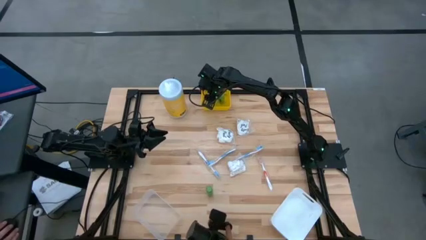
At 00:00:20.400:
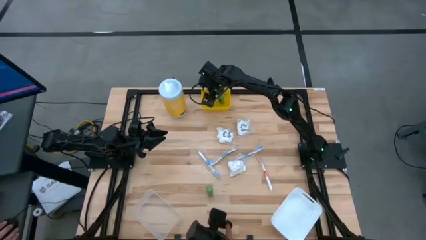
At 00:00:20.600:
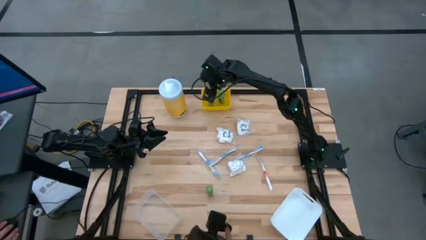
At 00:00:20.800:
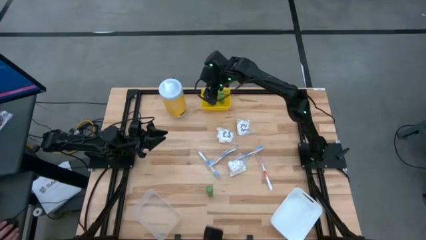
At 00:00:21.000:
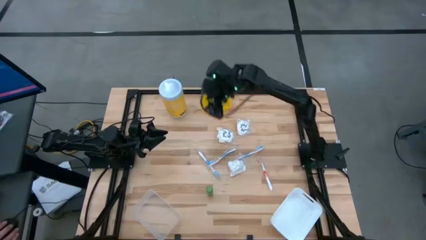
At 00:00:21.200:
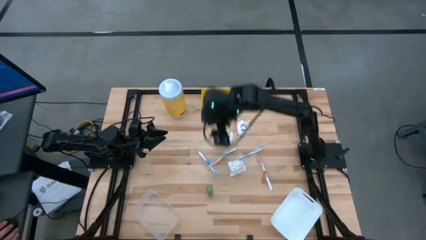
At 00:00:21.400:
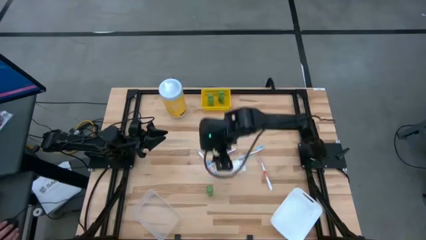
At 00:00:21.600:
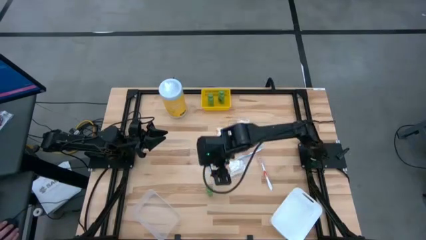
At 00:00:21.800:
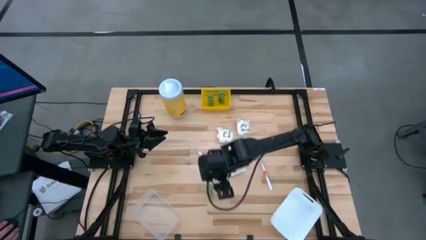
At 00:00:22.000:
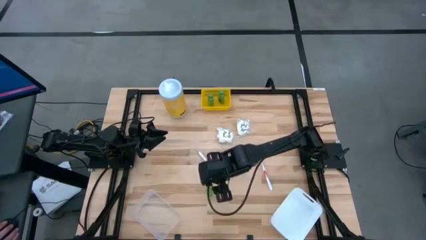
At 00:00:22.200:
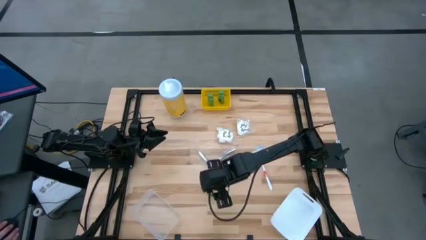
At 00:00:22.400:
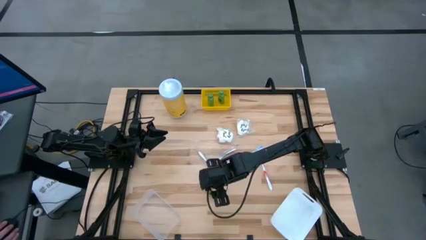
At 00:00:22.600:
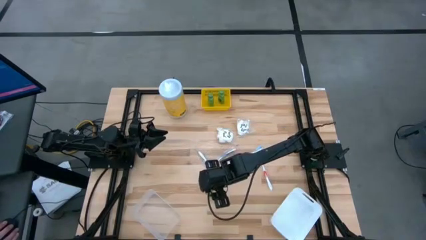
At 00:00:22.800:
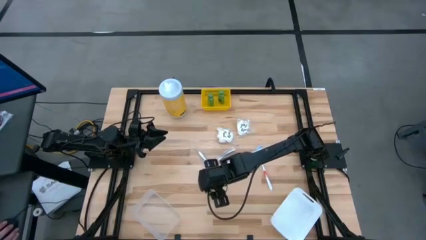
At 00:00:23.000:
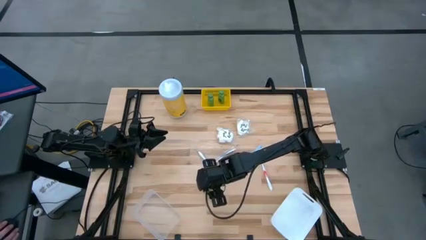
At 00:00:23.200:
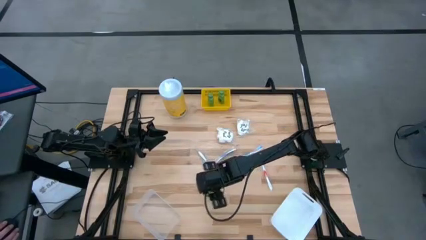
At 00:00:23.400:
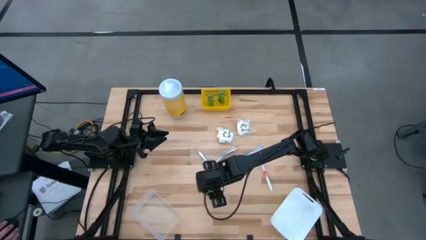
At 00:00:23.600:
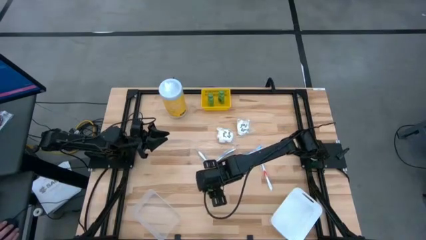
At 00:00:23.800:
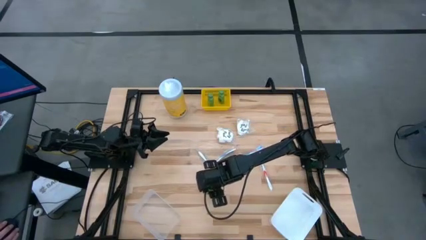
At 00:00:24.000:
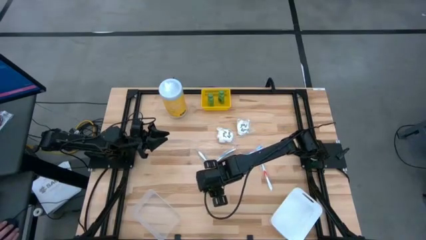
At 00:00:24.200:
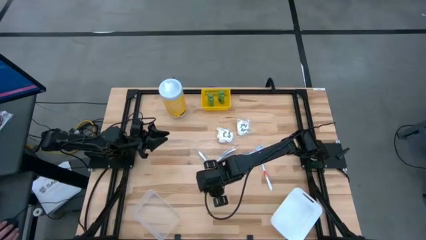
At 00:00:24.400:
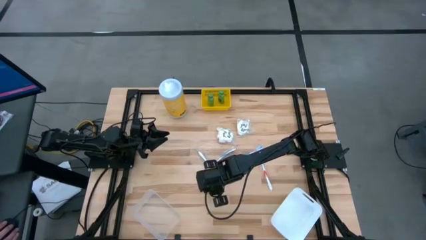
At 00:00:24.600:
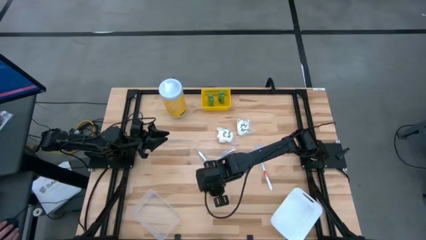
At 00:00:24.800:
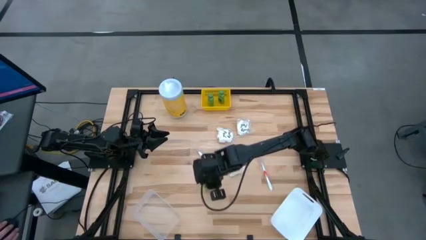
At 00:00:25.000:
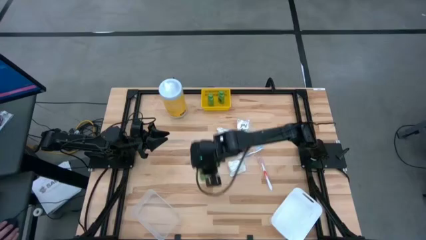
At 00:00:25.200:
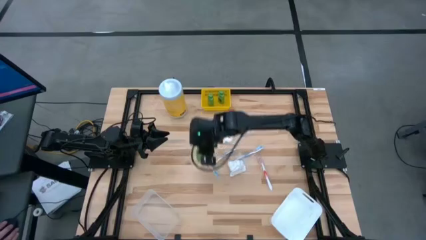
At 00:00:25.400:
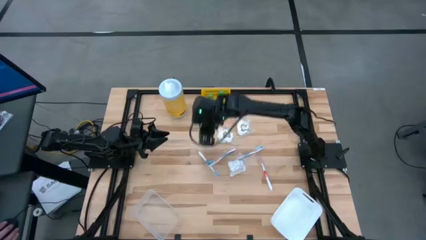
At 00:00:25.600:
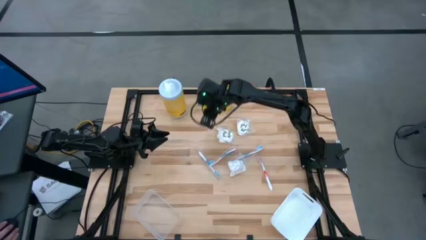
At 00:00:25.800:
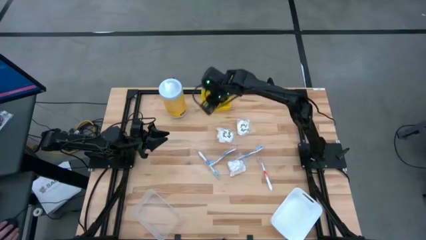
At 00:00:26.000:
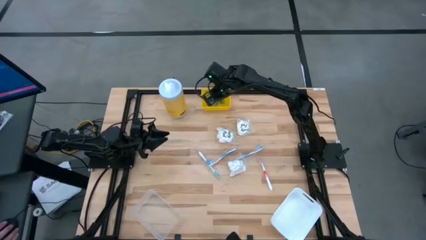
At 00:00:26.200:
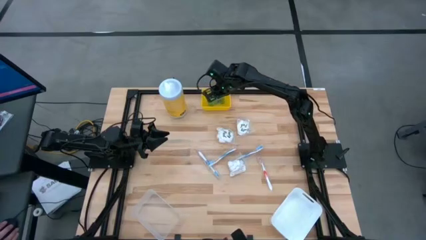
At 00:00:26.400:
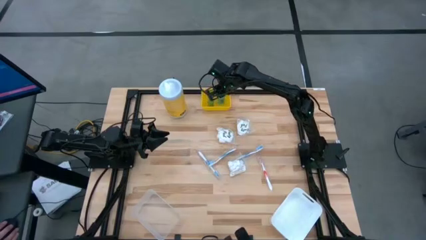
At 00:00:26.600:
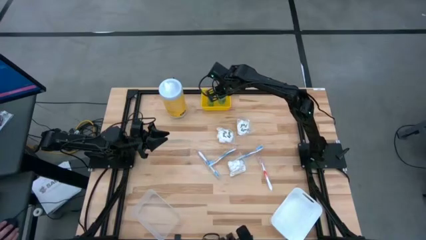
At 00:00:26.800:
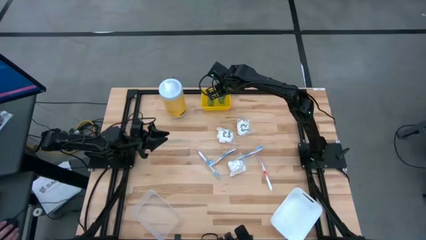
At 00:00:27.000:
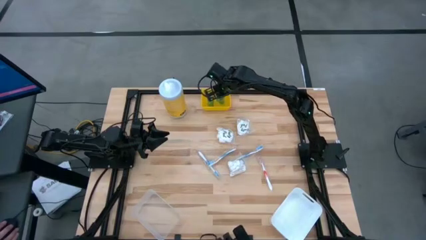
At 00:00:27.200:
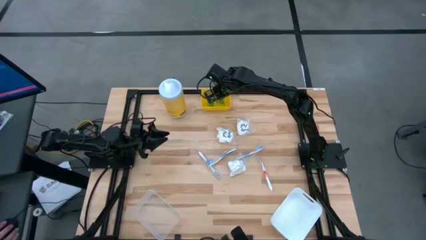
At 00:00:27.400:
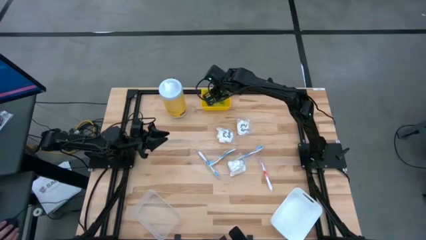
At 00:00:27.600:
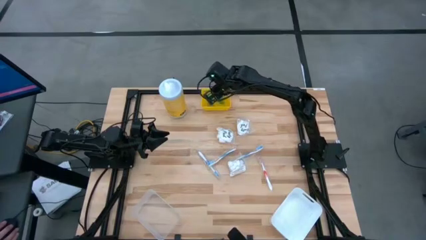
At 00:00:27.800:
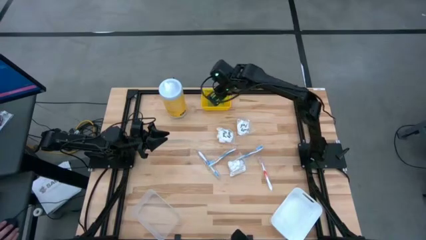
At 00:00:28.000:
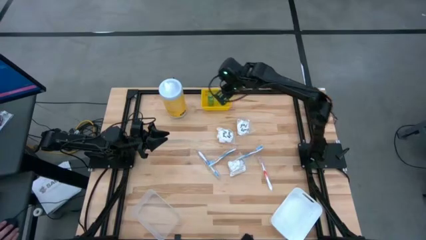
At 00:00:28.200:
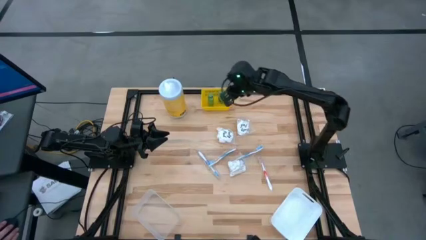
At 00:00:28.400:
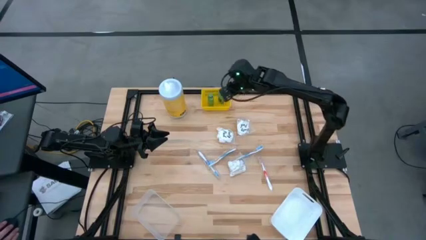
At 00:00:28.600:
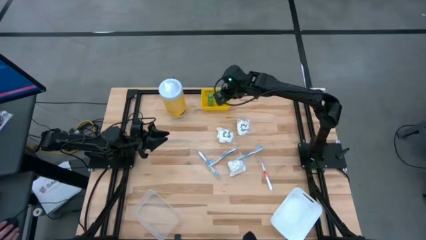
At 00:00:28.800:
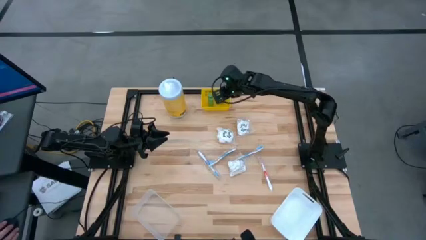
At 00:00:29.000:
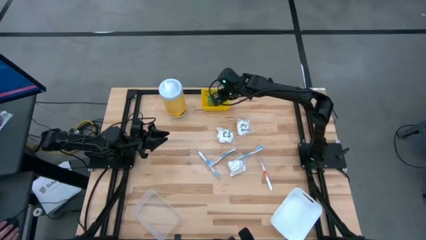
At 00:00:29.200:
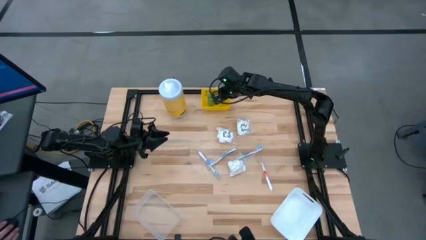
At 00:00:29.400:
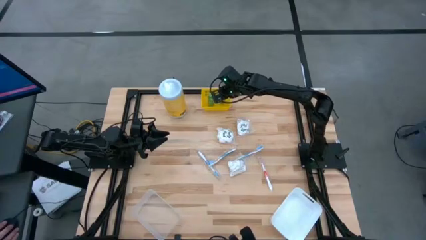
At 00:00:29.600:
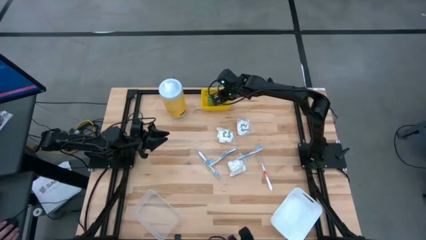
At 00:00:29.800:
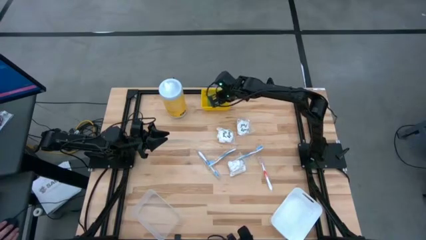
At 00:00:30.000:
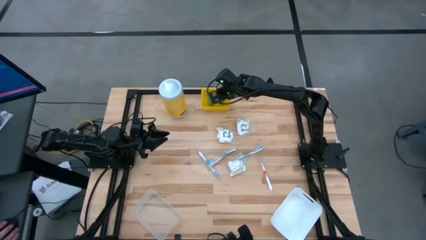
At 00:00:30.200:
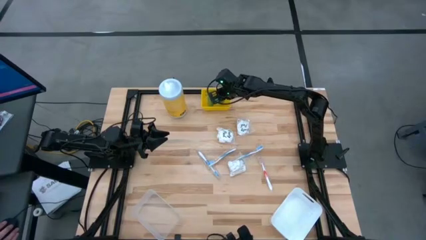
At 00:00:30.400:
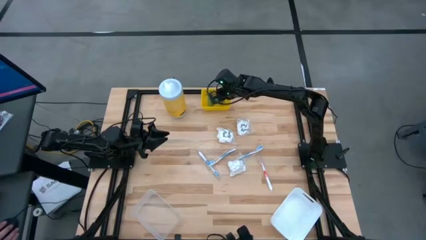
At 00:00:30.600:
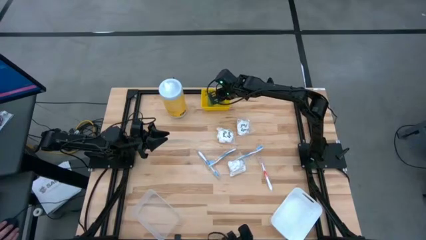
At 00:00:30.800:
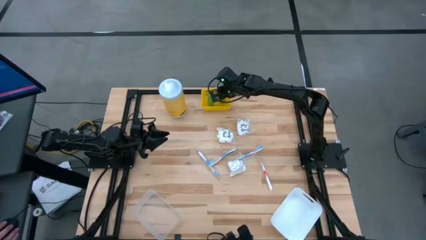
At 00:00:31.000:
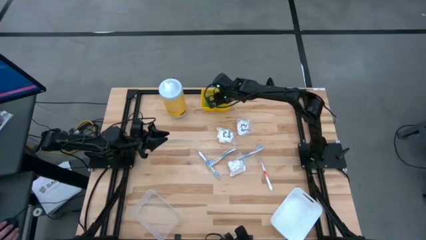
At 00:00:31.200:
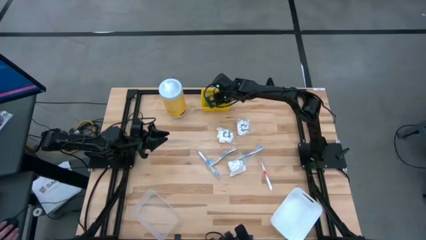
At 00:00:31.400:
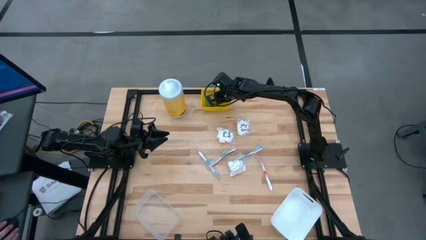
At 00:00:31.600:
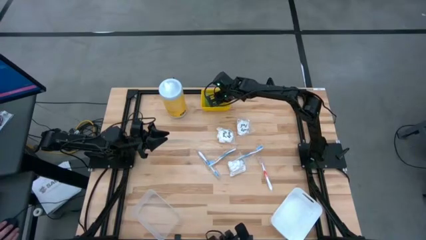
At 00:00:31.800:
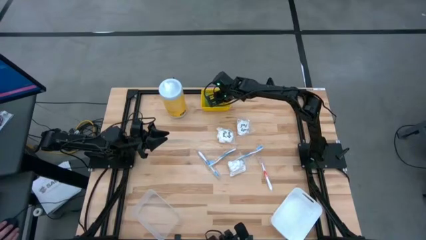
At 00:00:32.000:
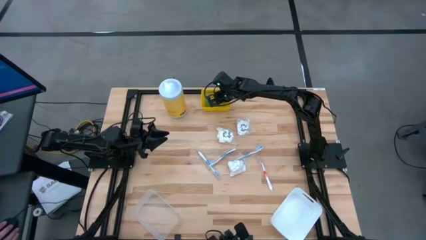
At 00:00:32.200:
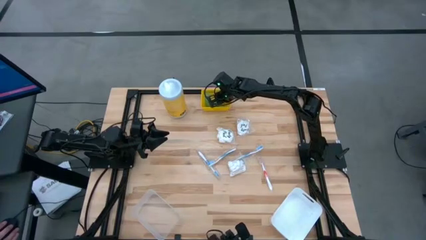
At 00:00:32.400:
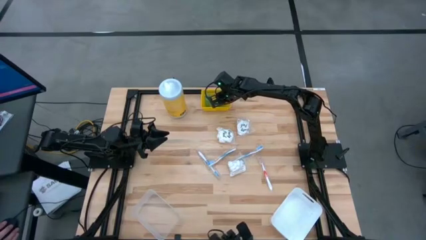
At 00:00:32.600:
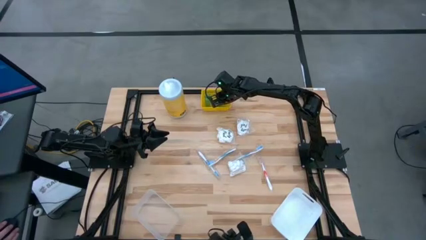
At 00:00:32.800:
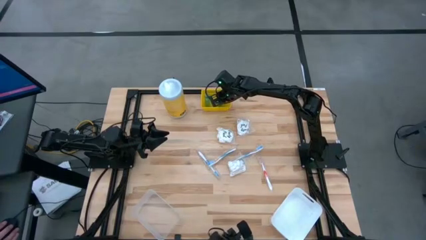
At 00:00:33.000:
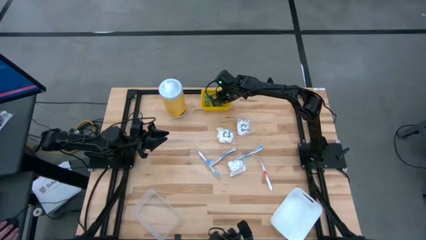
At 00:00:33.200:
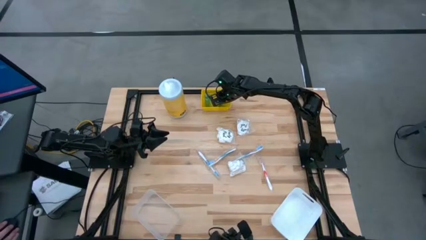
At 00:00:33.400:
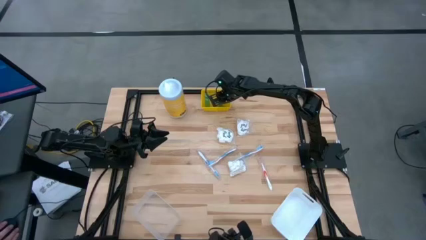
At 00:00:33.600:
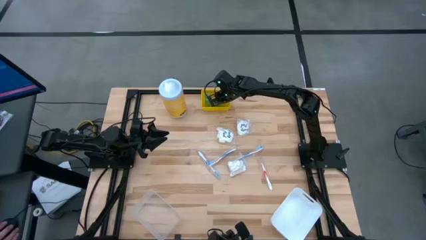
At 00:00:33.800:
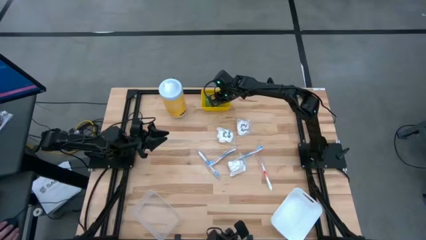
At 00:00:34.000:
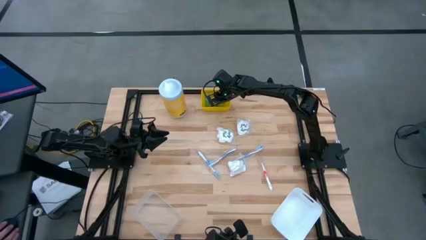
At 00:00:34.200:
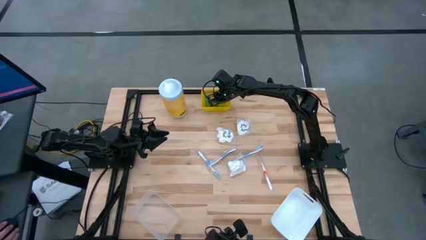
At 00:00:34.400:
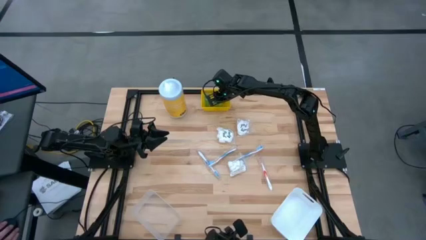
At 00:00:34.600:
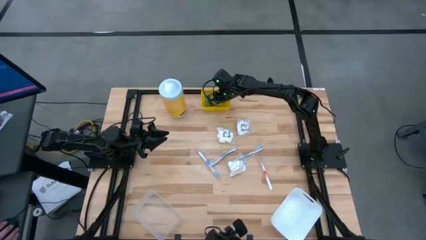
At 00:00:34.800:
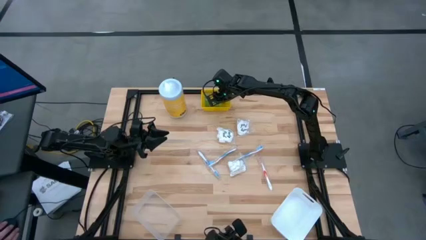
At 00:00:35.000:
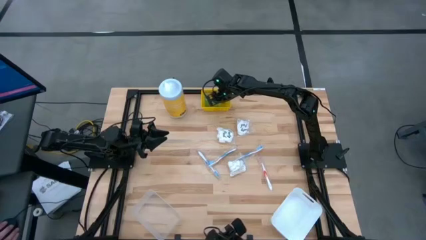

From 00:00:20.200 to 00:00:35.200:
Task: Pick & Place Travel size toiletries
Put the green shampoo into the yellow bin
